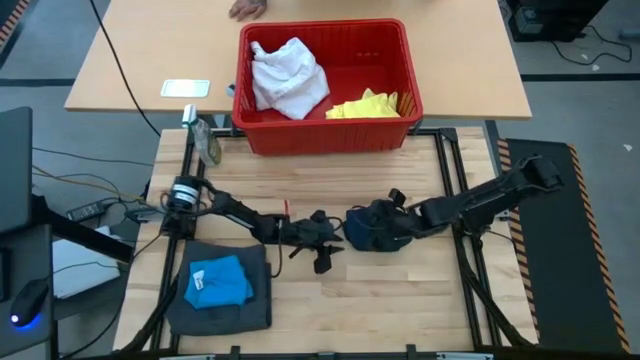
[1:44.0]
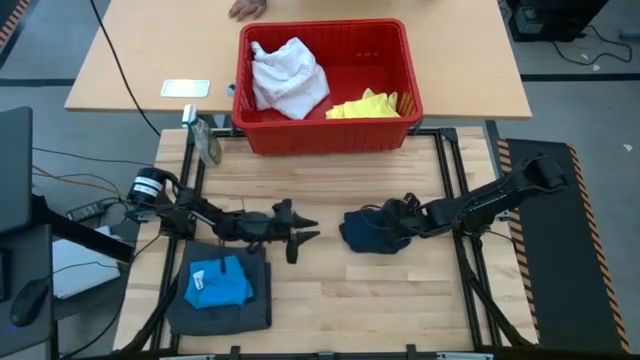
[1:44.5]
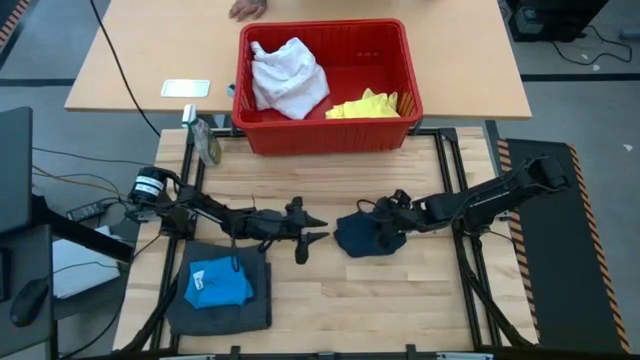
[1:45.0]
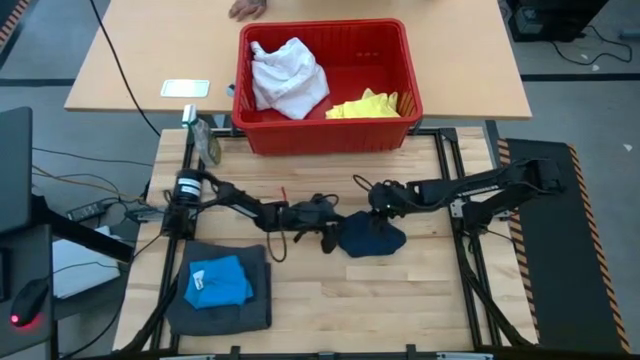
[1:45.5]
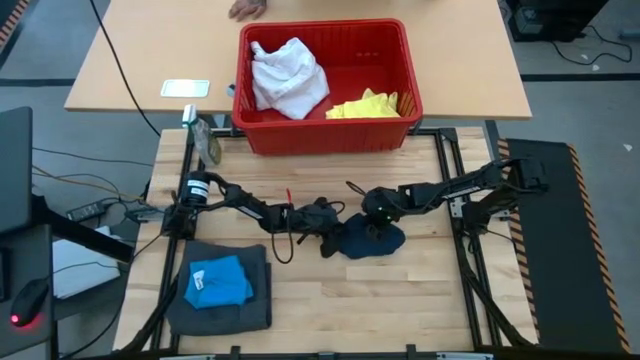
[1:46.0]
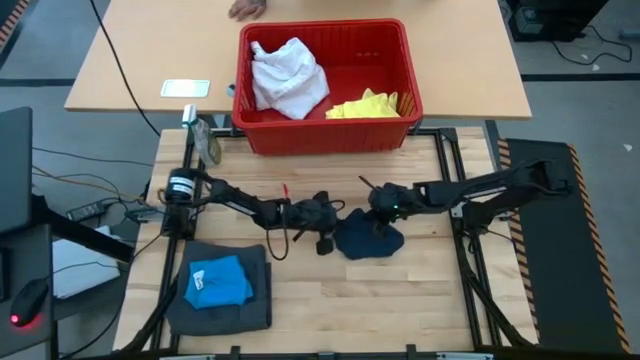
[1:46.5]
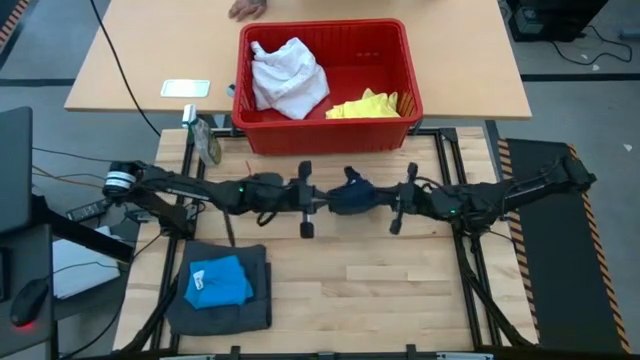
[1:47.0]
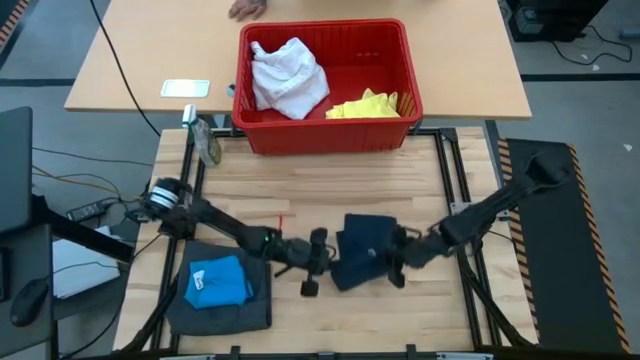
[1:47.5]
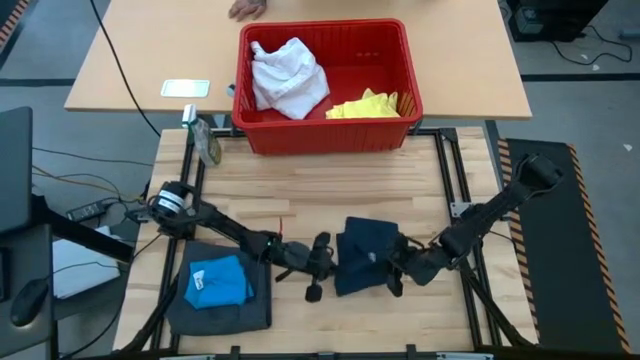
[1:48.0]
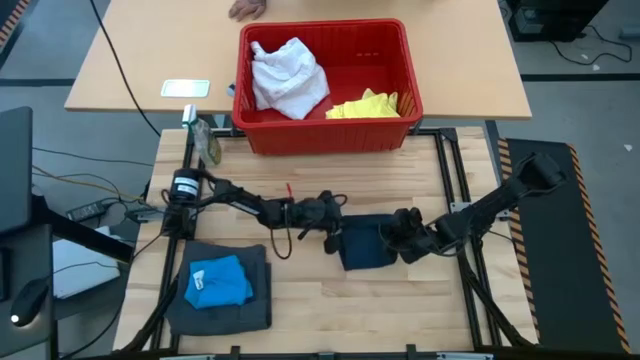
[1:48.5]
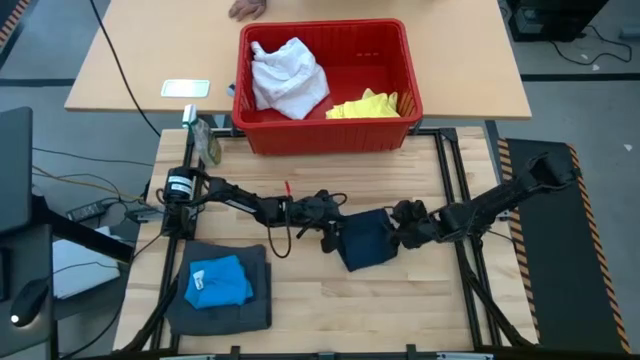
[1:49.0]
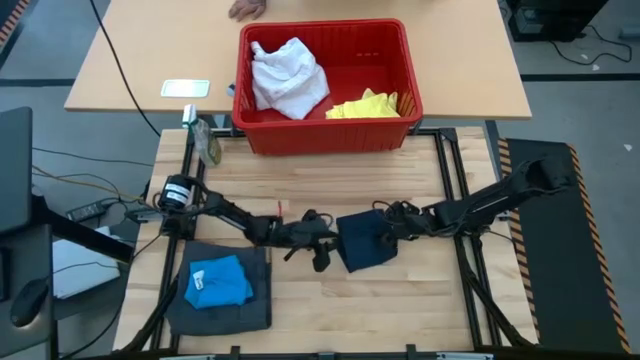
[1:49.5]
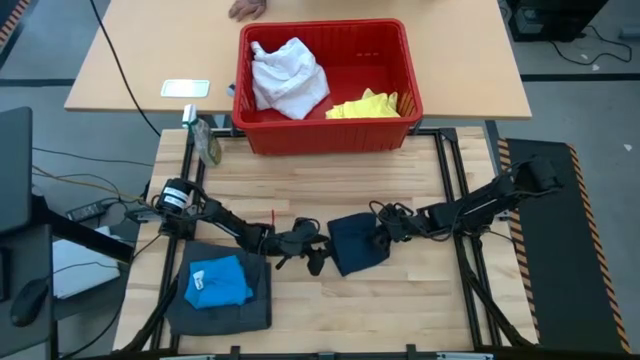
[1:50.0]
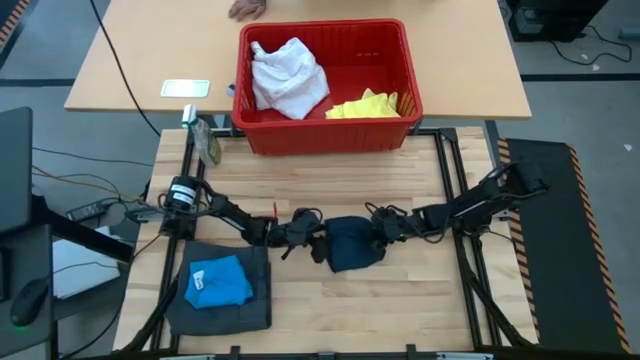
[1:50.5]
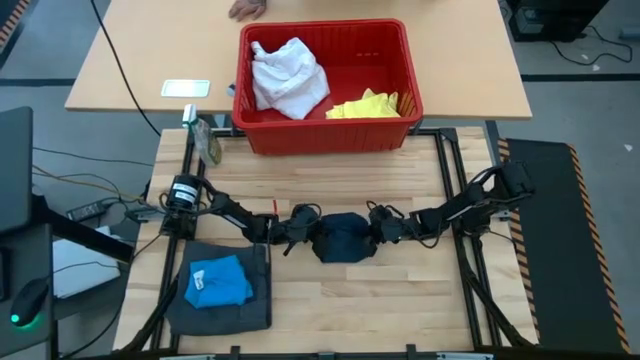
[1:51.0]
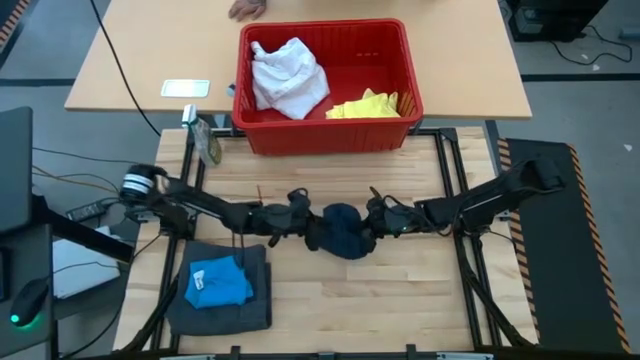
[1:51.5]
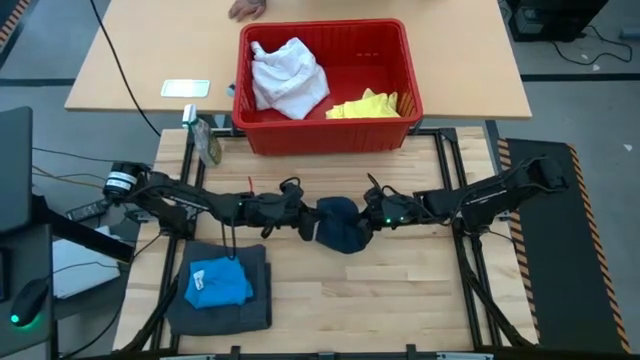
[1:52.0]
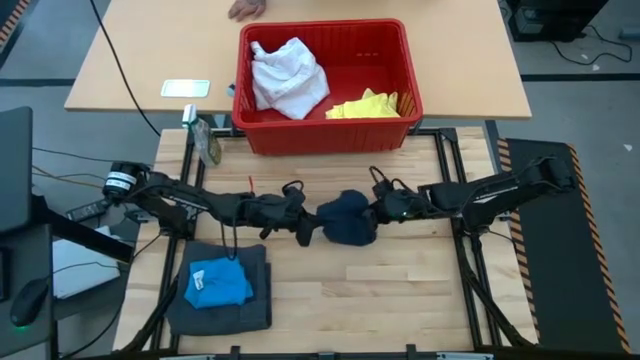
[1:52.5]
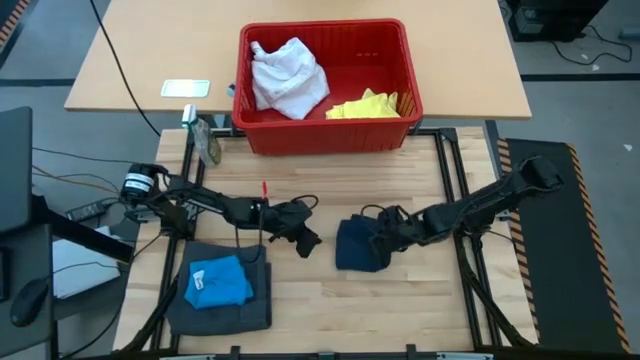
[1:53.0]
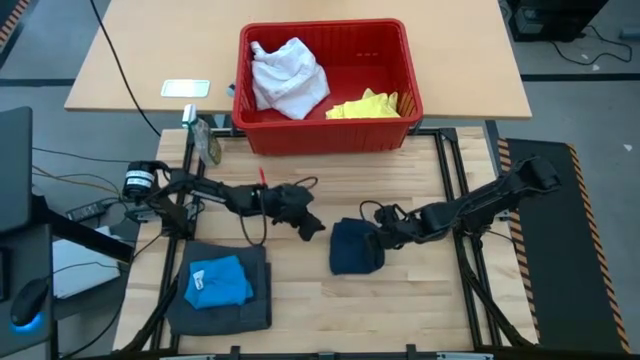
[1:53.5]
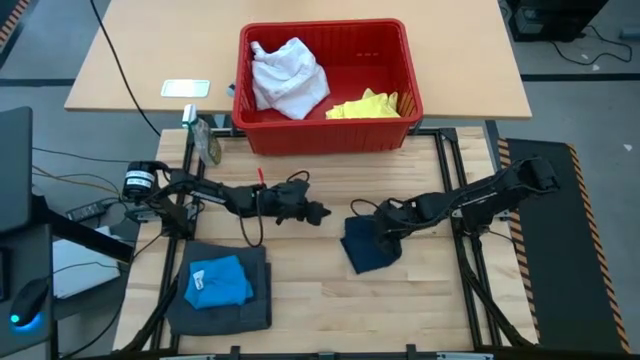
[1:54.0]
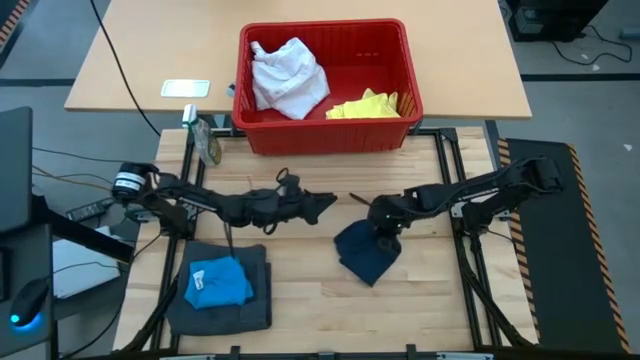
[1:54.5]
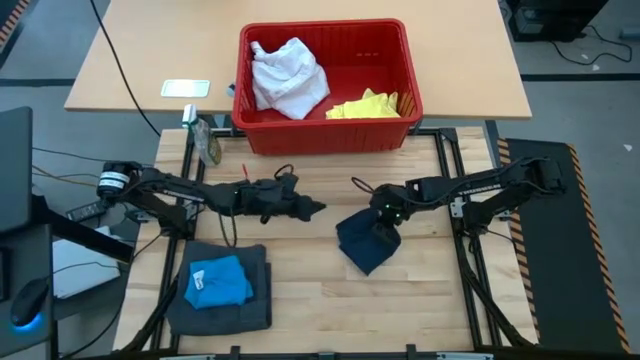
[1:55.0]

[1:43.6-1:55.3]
Task: Fold laundry
Fold the dark blue shorts

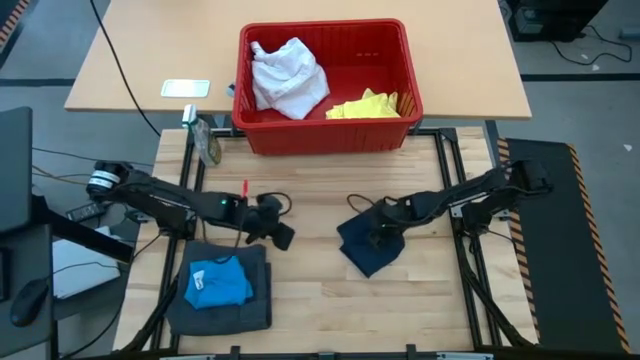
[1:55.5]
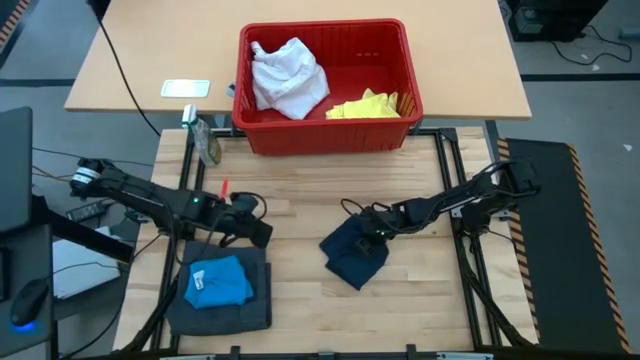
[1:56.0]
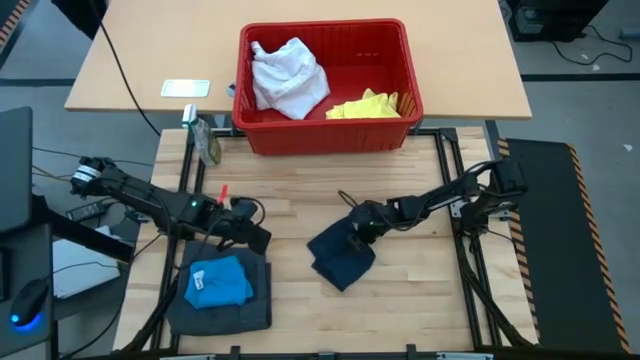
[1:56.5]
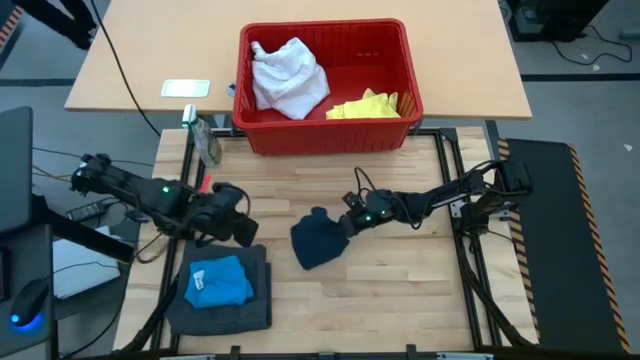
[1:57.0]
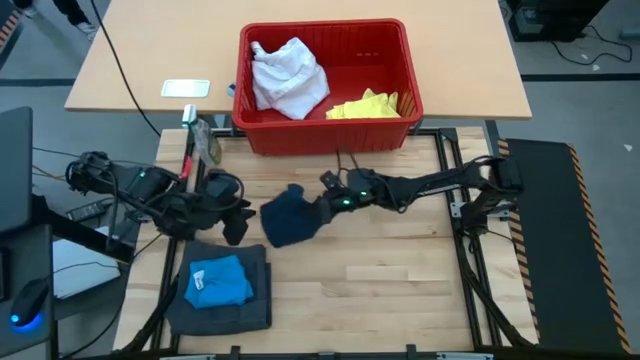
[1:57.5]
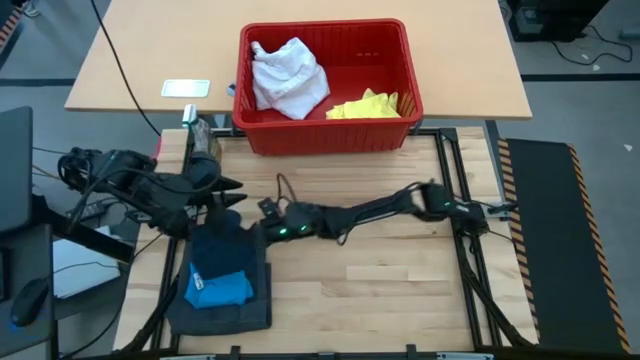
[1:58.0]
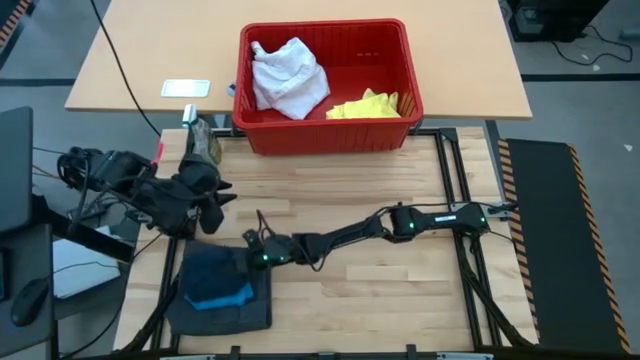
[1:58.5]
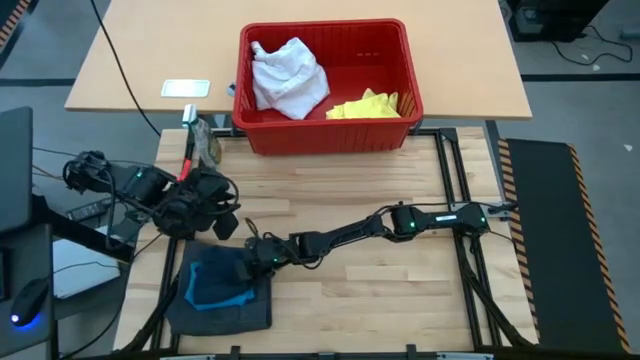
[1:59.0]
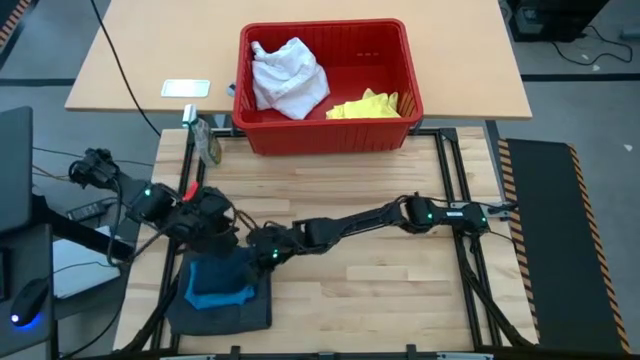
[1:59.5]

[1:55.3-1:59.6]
Stack the dark blue shorts on top of the light blue shorts

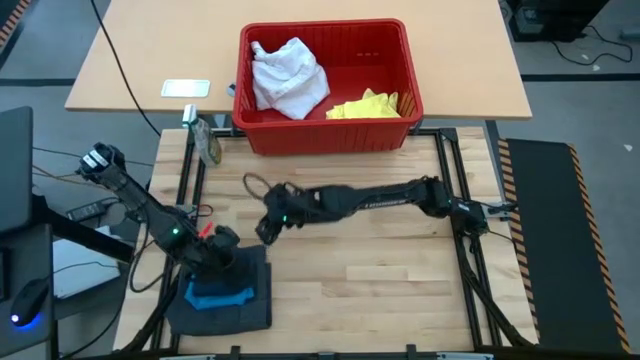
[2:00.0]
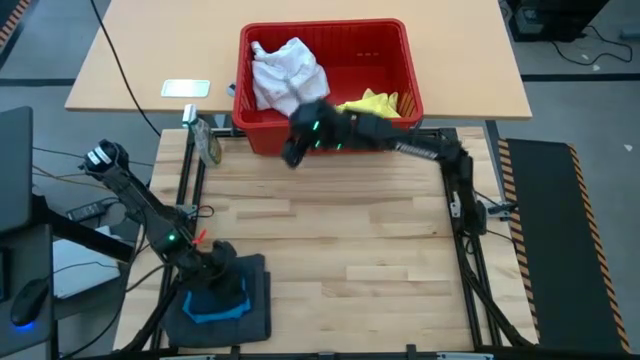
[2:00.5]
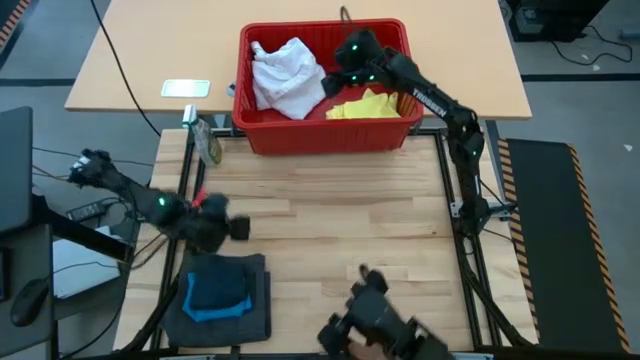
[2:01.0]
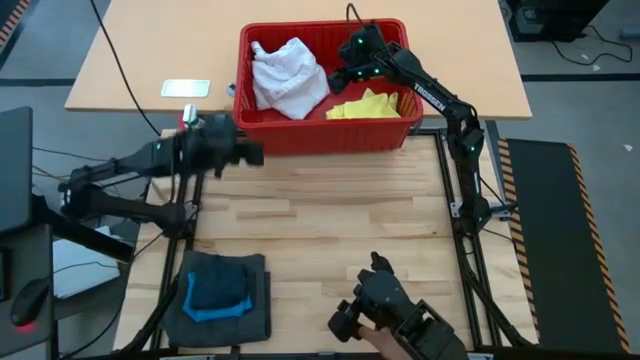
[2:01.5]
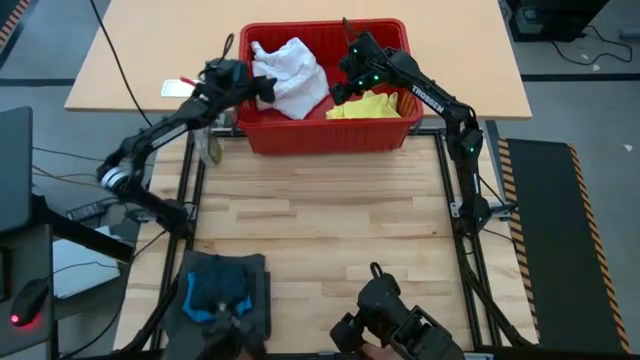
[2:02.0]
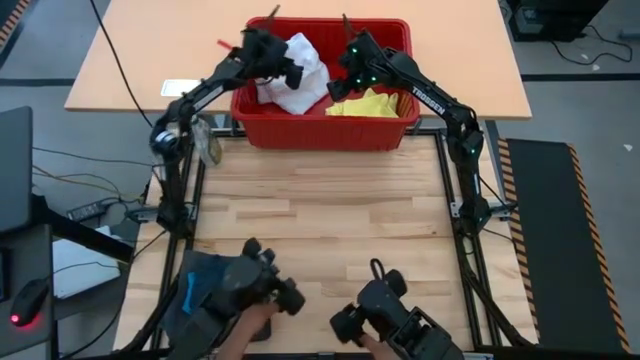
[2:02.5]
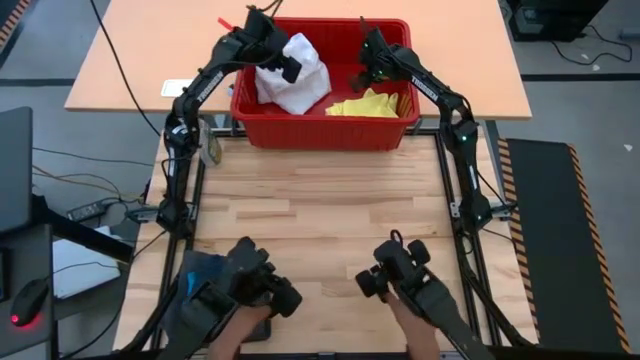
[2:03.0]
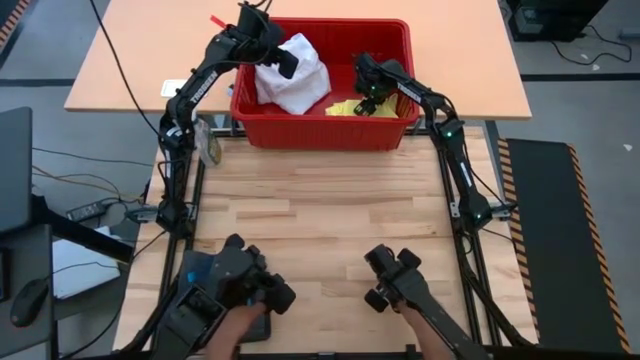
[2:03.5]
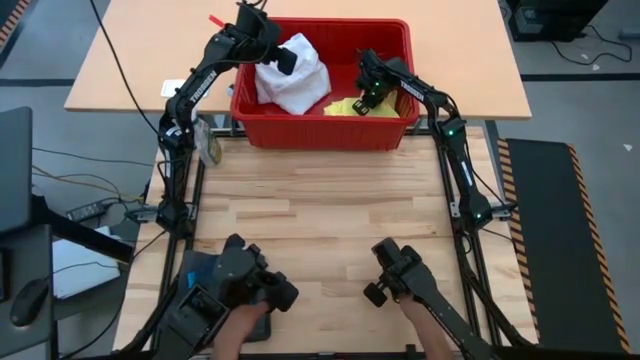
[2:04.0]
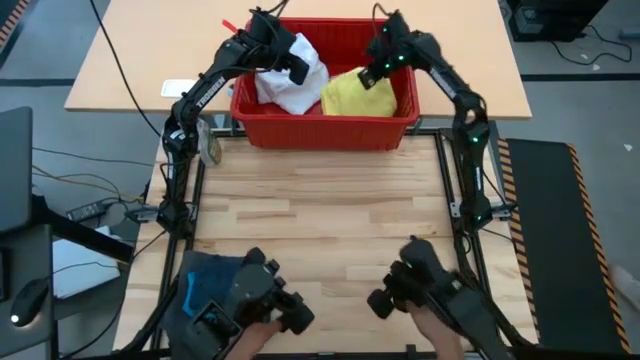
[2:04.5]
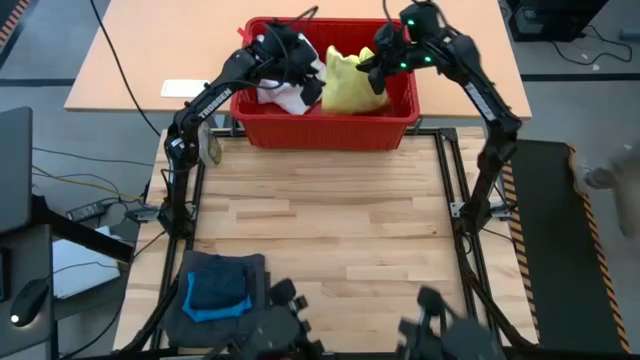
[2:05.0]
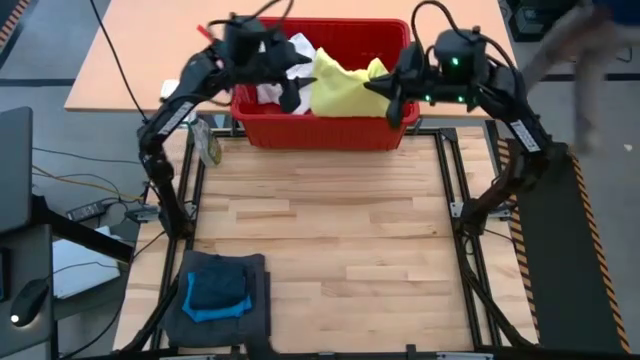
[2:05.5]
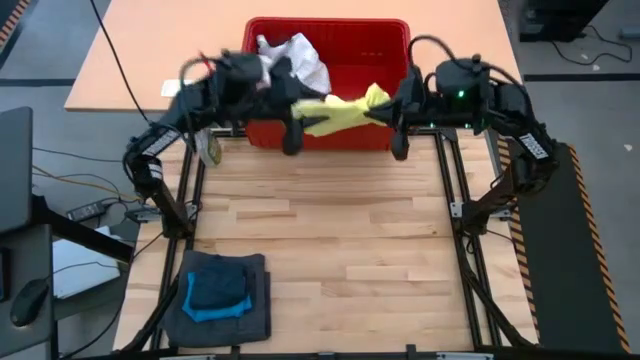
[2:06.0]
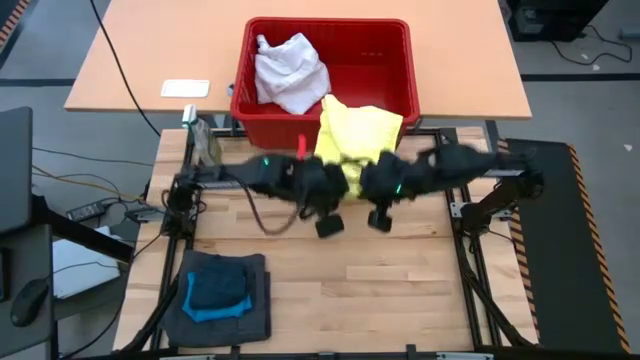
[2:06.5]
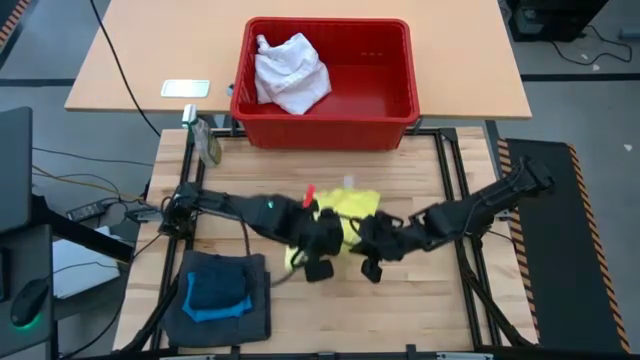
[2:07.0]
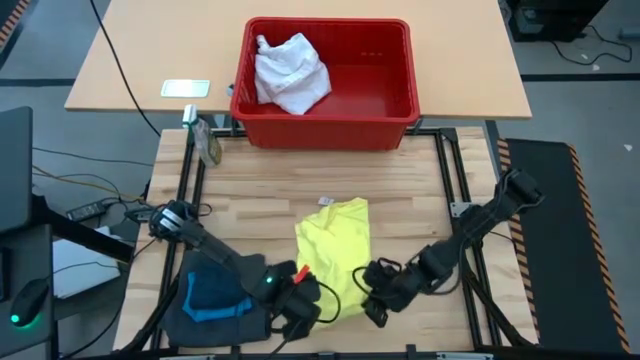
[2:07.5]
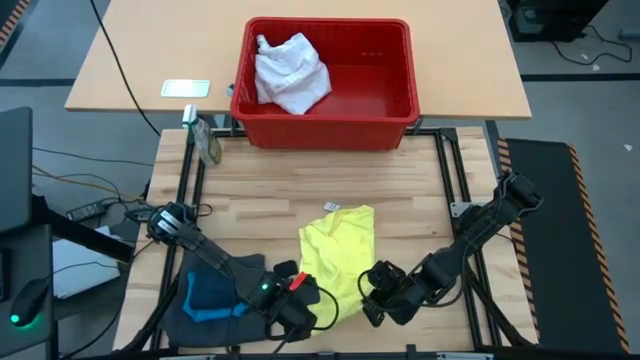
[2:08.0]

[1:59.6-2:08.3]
Remove the yellow shirt from the red bin
